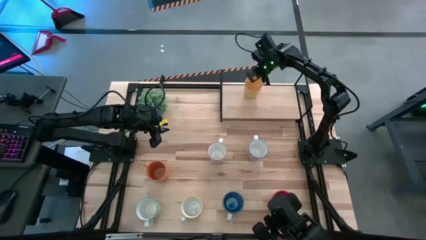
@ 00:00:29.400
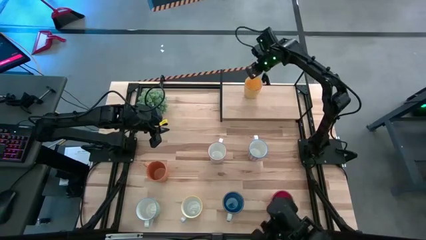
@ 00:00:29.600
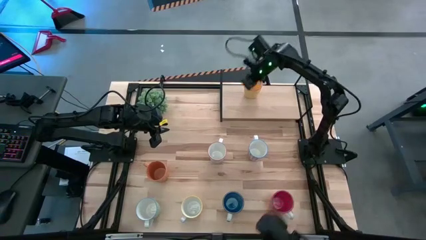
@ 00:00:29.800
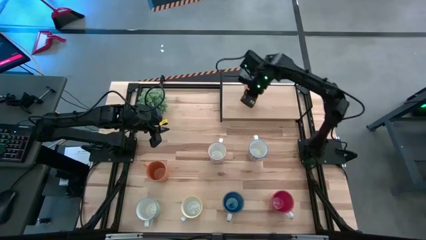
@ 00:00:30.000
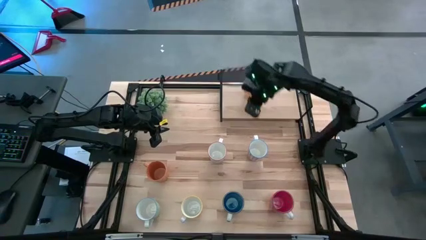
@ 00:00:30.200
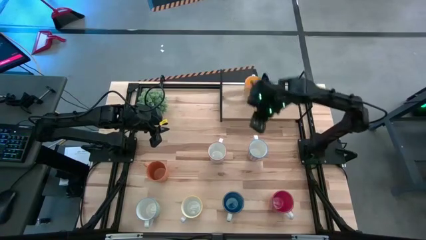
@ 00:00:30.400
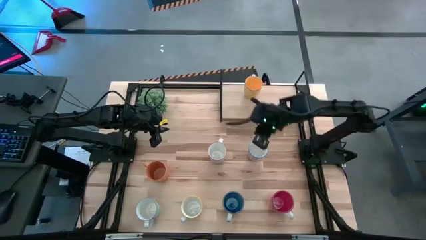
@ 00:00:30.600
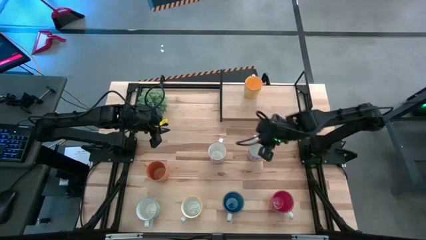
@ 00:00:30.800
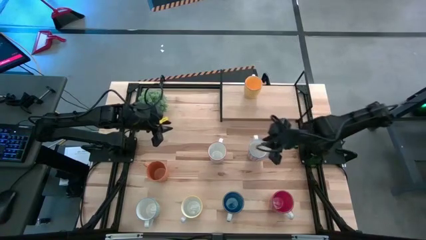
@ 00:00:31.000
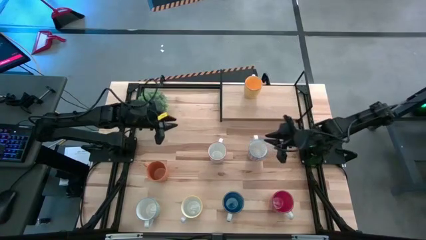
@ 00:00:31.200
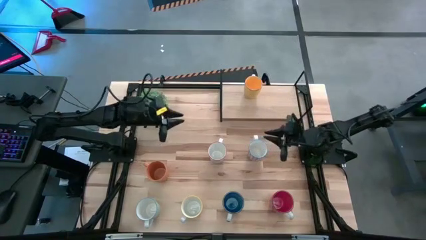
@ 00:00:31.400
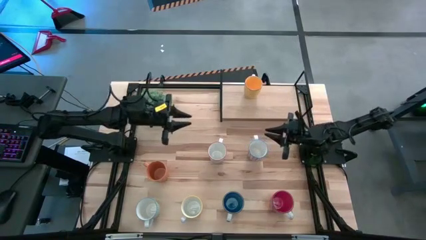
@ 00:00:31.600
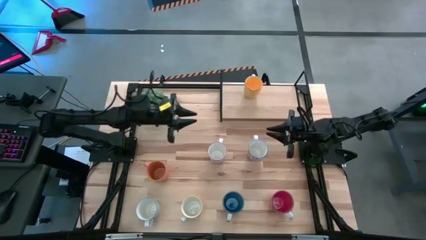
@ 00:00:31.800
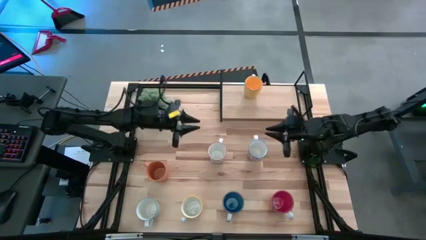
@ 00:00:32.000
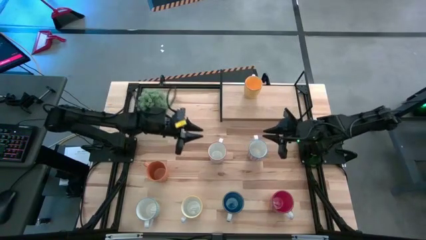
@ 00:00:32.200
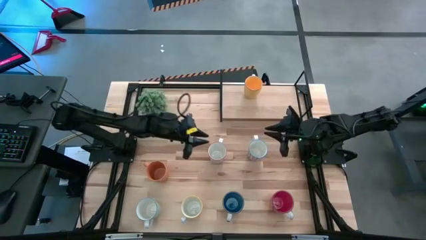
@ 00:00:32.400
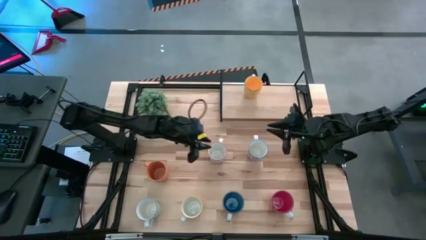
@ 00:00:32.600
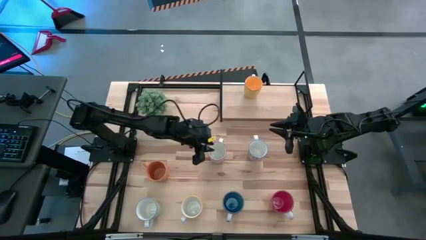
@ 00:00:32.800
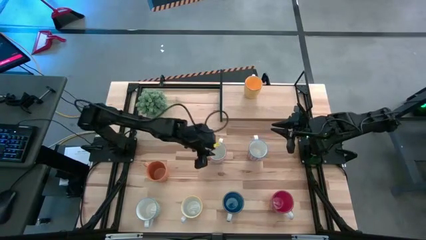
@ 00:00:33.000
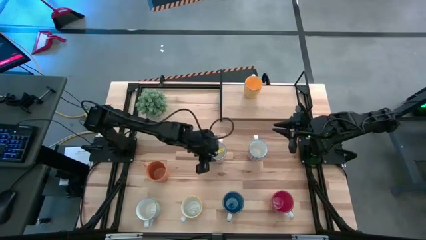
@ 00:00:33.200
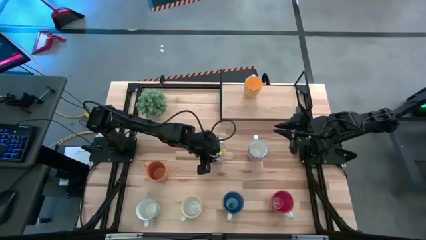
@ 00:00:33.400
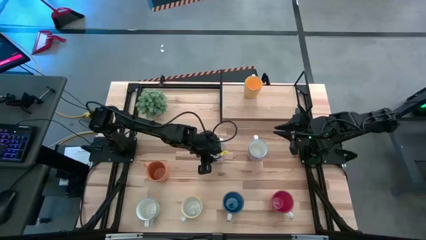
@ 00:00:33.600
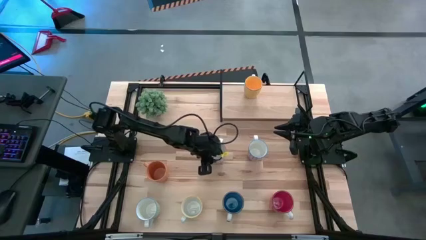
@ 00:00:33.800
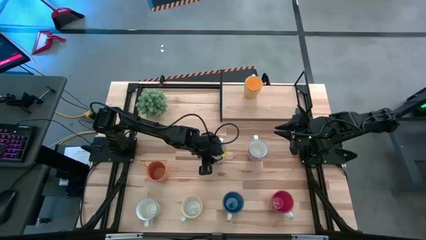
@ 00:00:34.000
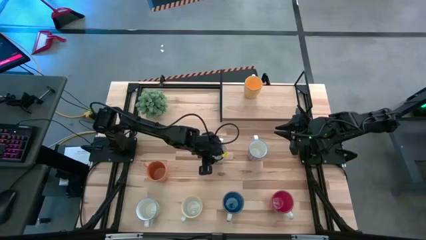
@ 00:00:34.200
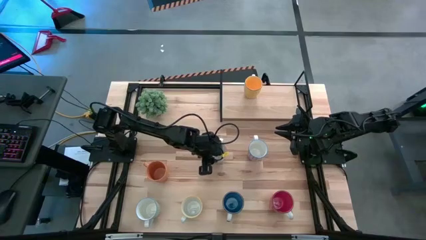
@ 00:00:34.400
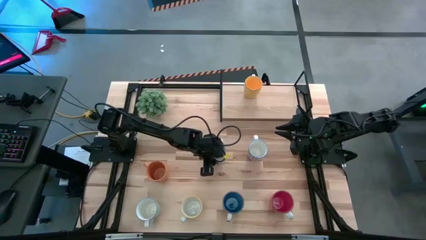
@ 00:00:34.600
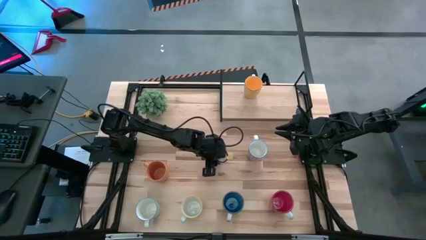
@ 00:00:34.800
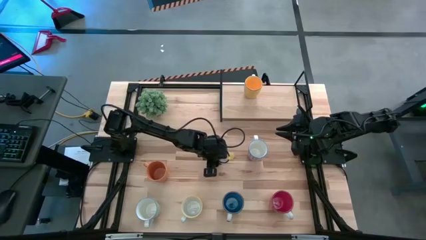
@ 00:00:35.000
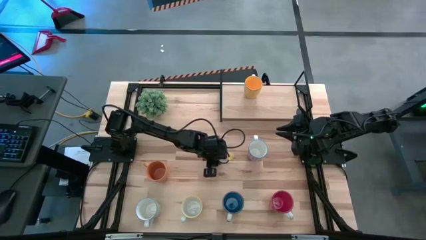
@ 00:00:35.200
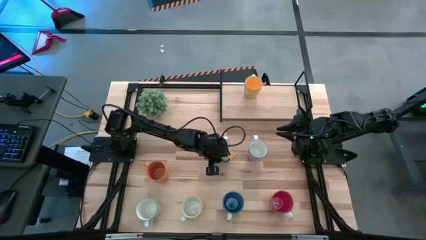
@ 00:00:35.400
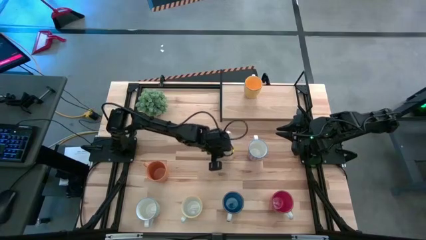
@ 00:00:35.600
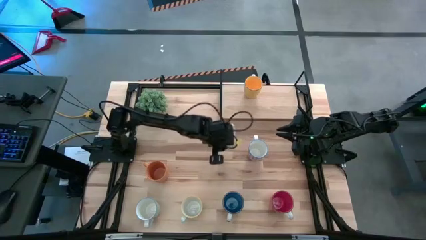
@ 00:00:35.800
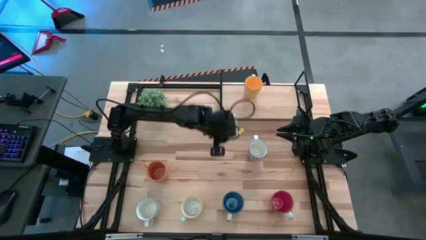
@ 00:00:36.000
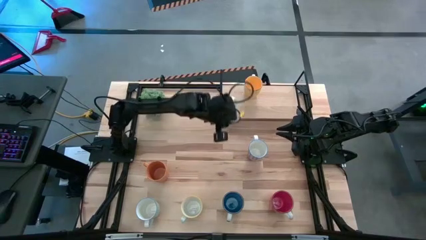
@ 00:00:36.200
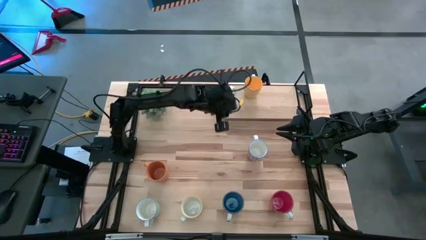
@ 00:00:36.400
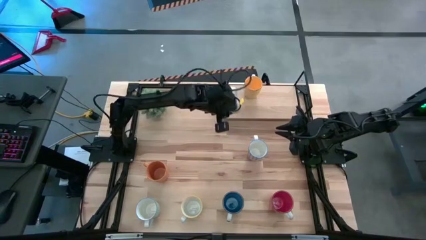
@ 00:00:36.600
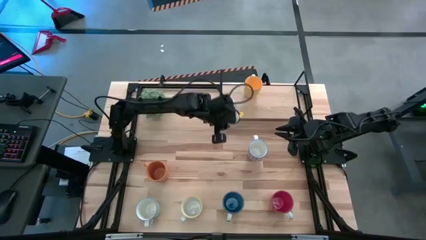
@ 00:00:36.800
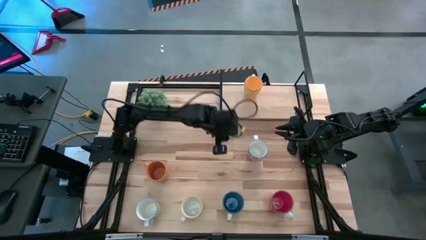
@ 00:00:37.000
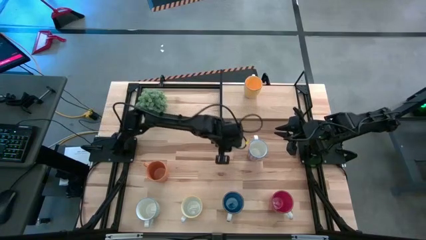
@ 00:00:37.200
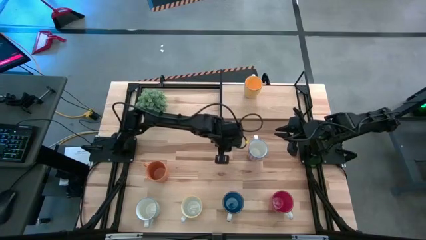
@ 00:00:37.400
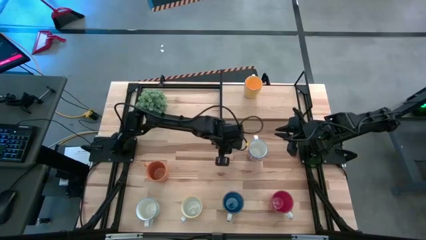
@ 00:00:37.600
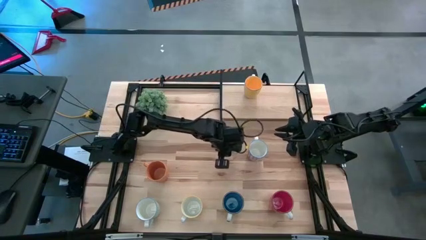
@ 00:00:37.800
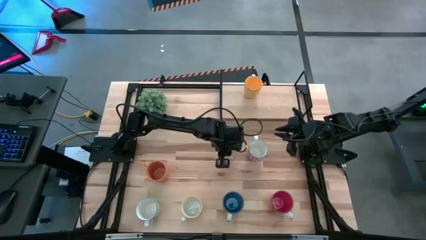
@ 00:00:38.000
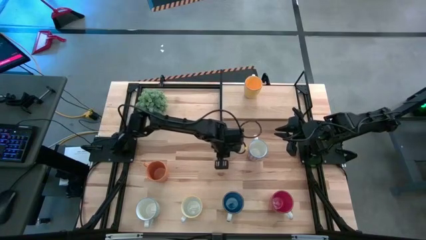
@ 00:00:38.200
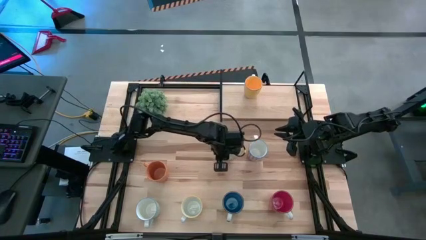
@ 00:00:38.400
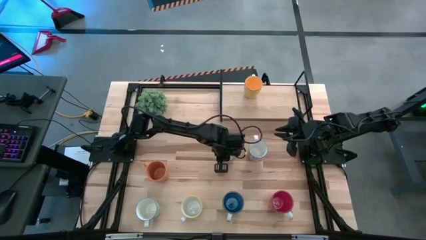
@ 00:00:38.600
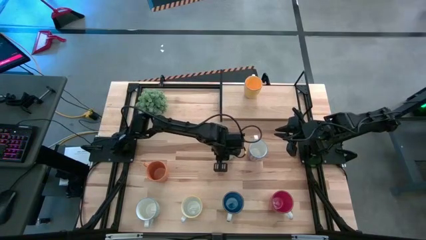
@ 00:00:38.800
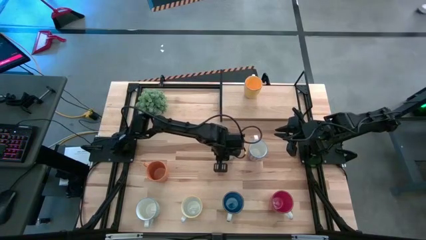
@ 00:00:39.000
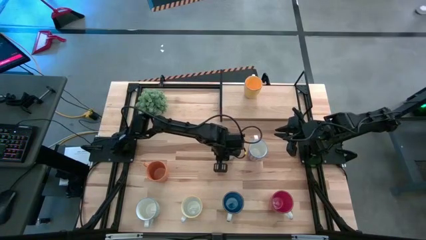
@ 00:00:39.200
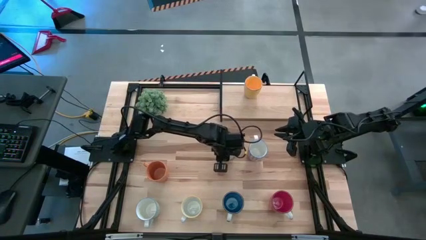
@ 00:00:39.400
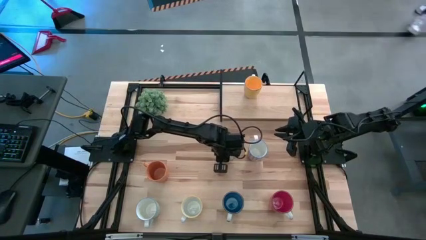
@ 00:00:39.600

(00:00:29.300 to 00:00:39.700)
Task: Place coffee mugs
Put the gray patterned mug on the shelf

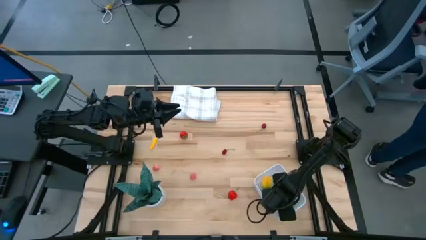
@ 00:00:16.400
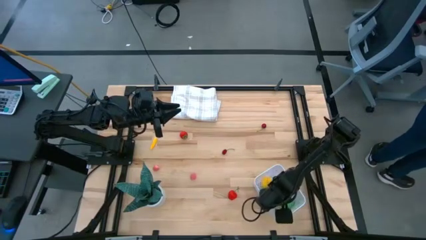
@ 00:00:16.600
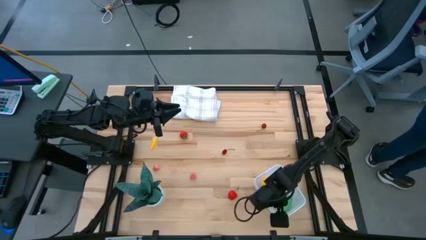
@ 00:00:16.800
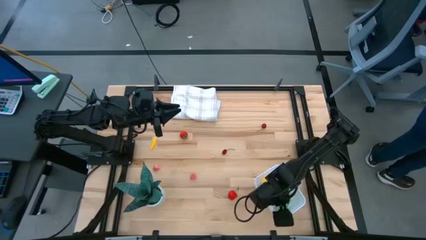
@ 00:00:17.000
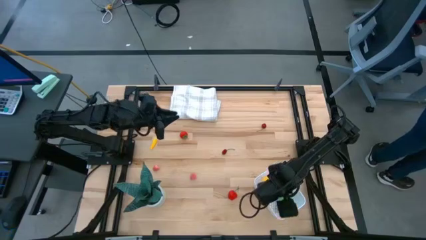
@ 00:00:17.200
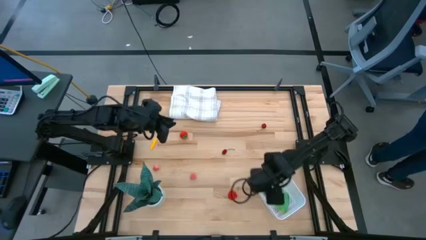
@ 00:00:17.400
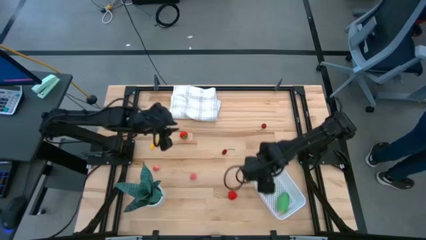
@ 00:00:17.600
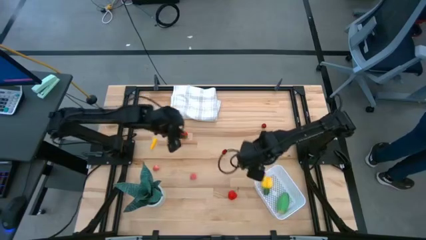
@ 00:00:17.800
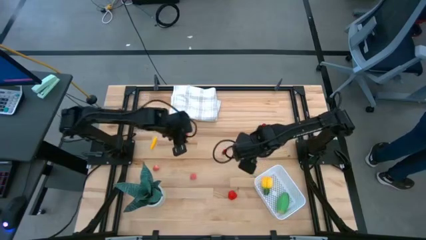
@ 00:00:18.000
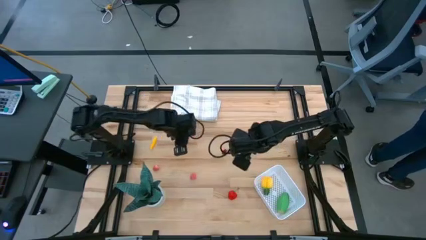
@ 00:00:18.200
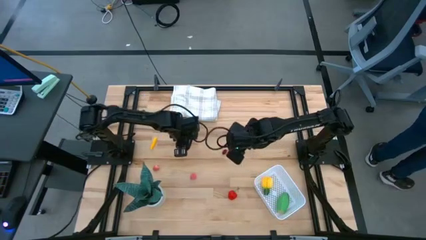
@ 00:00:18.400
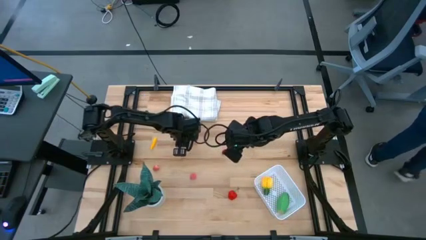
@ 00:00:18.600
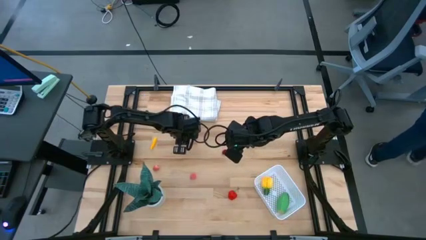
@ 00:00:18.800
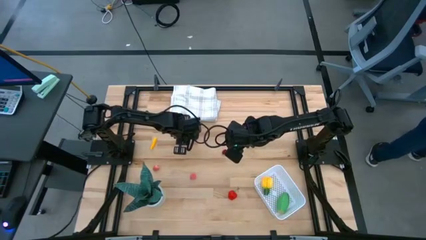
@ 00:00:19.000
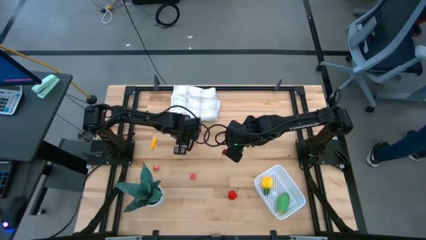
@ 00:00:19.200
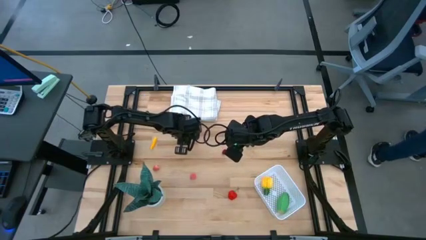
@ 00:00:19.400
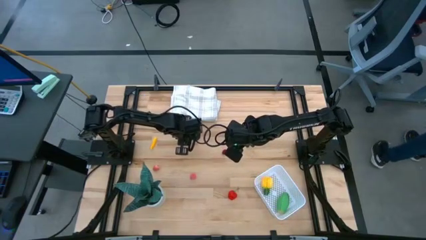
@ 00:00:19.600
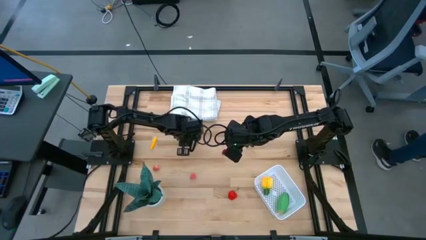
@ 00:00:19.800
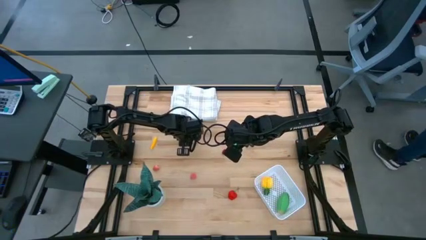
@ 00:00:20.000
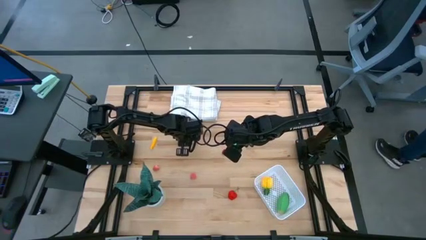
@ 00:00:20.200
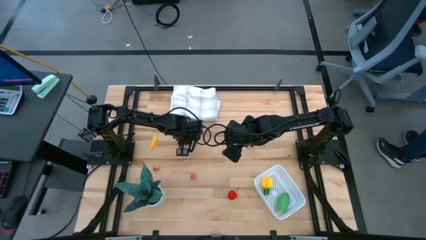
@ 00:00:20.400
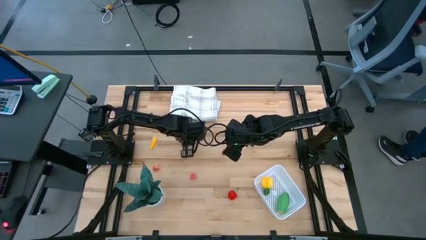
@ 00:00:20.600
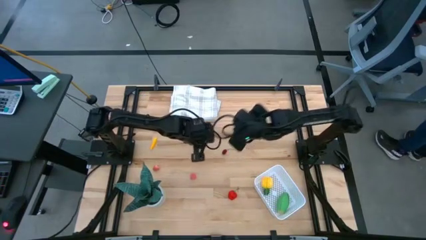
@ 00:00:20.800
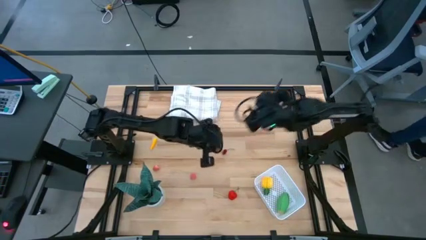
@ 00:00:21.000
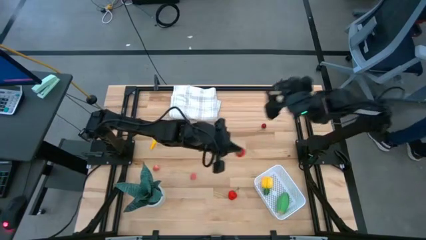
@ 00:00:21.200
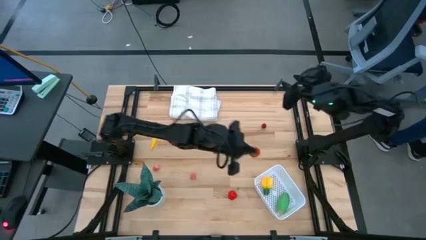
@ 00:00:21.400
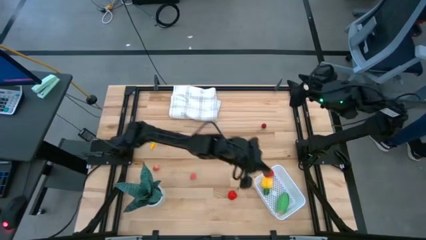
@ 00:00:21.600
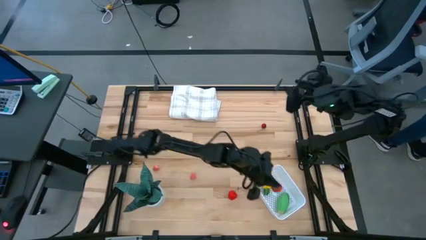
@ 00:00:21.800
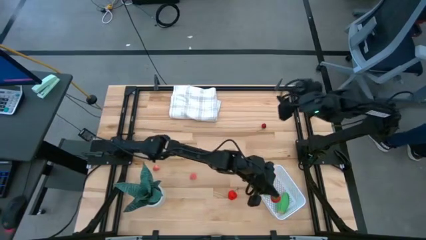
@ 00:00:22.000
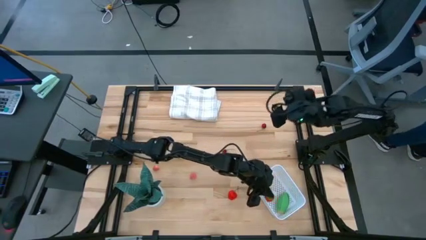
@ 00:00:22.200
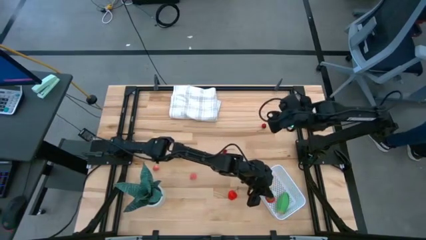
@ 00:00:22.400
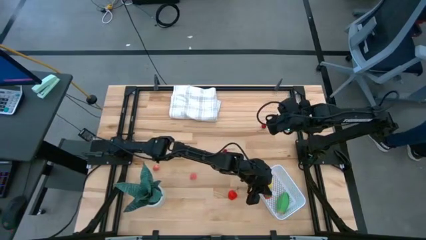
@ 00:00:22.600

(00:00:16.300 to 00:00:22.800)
Task: Pick and placing Produce into tupperware
Put the top strawberry into the white bin
